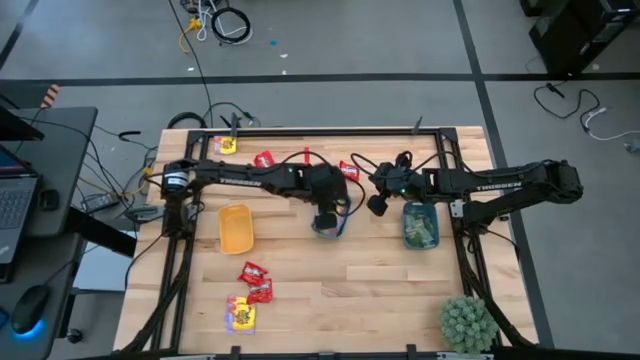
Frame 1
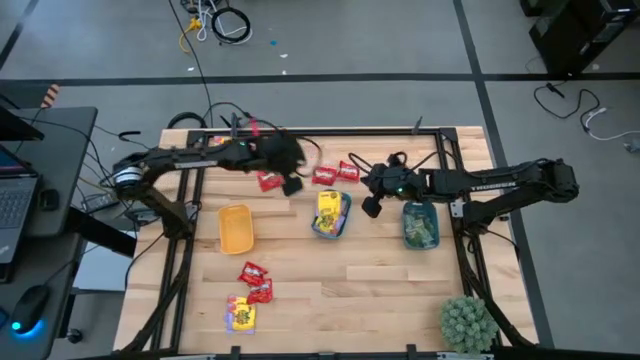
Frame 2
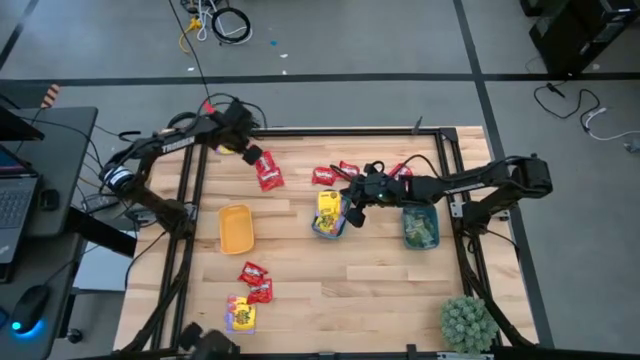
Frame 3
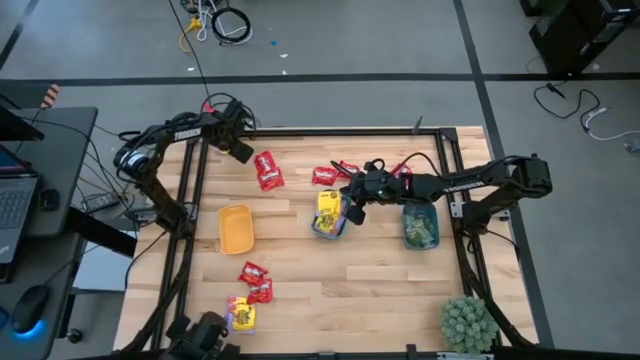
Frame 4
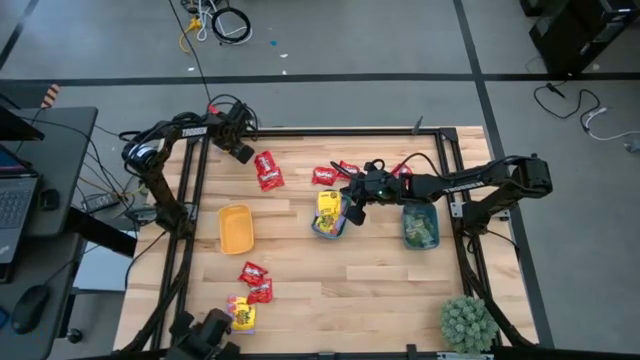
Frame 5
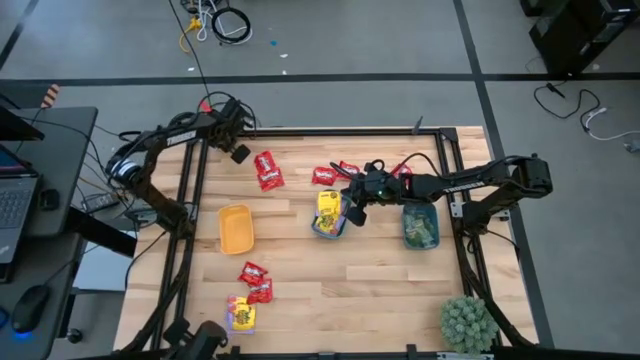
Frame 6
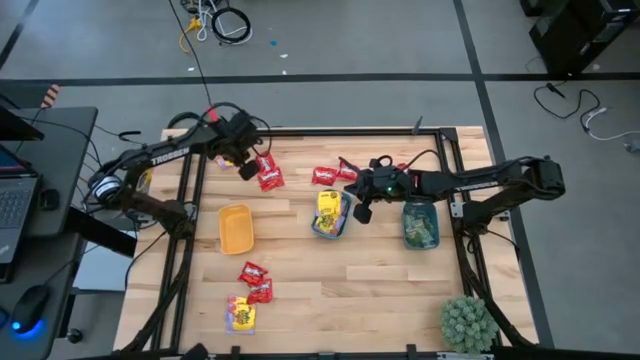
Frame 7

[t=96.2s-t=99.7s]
Task: Sort candy
Put the yellow candy pack into the green bin

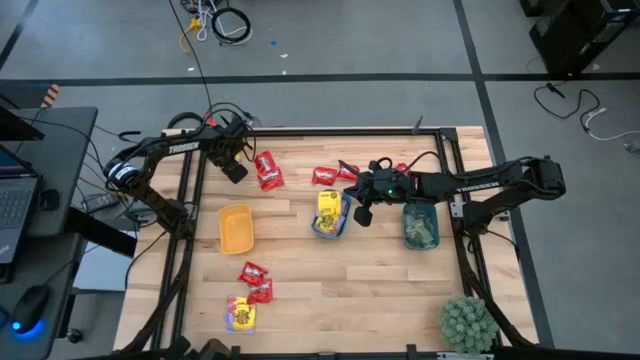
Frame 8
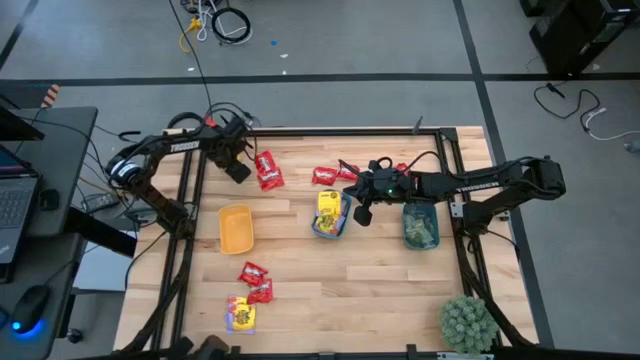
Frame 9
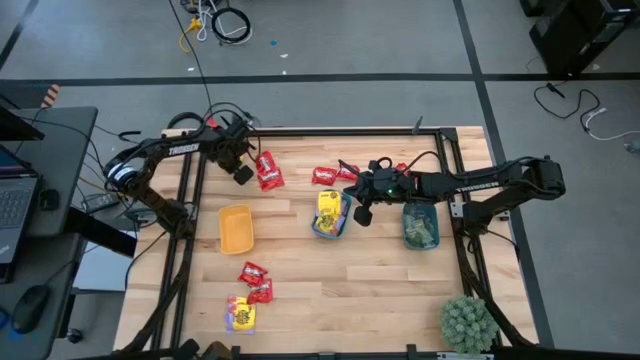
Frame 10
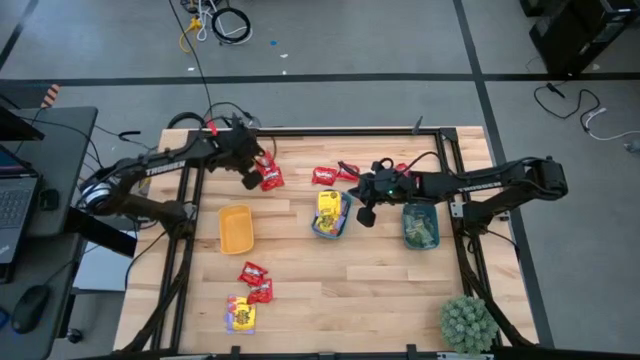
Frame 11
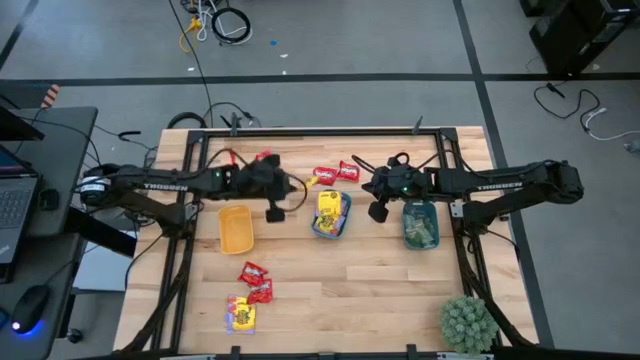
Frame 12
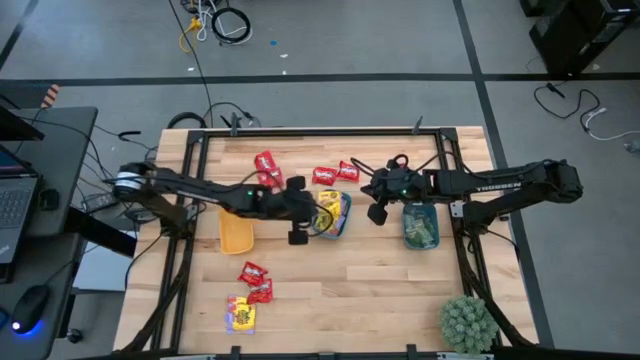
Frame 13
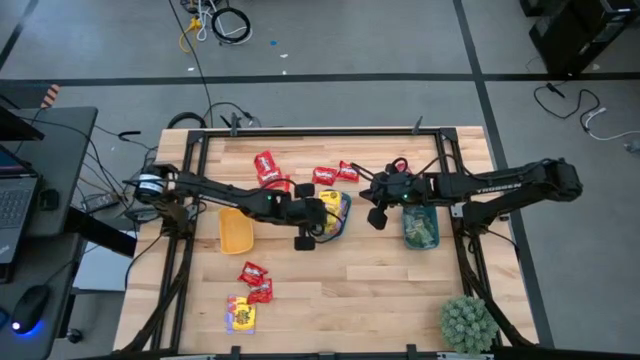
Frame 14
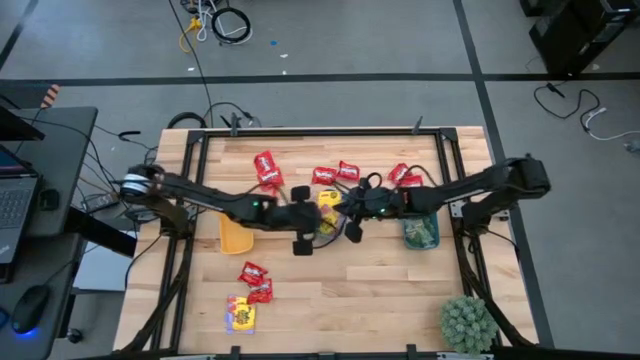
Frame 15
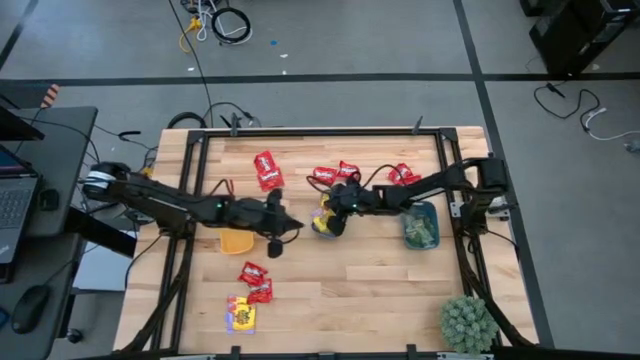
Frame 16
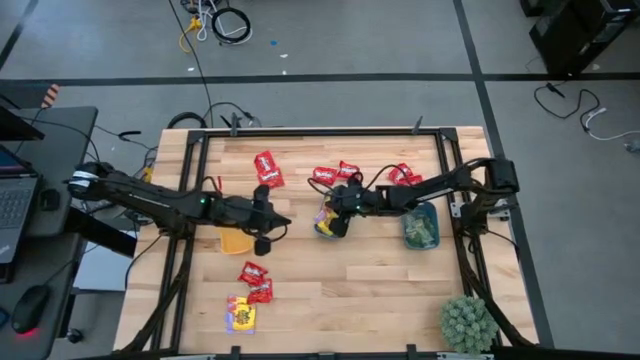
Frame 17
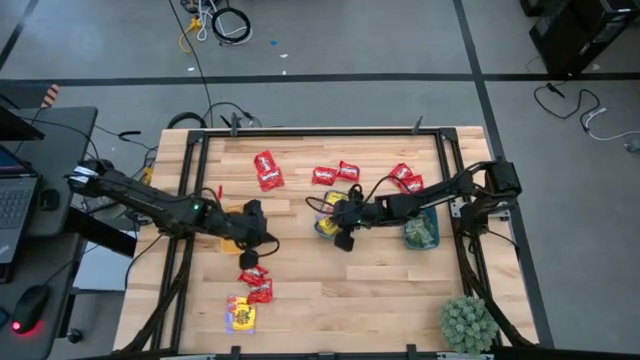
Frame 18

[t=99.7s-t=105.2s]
Put the yellow candy pack into the green bin

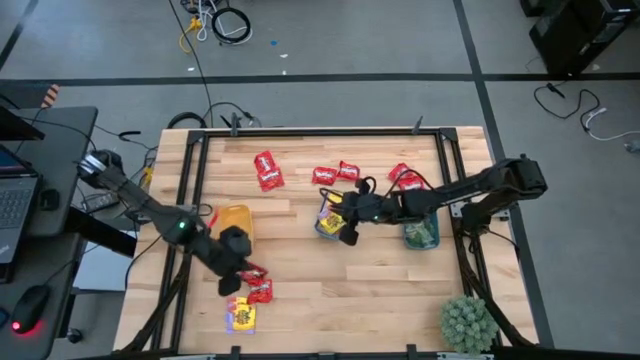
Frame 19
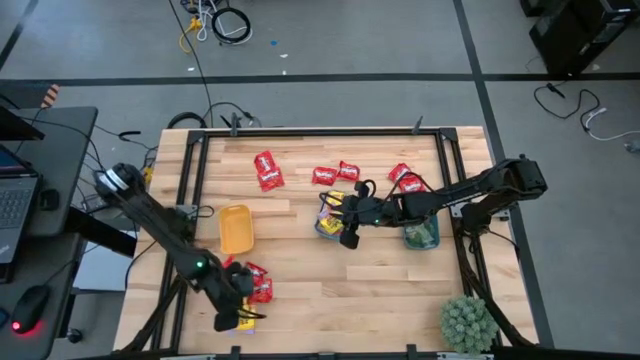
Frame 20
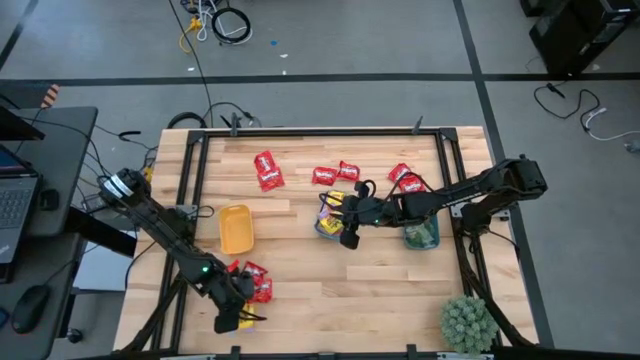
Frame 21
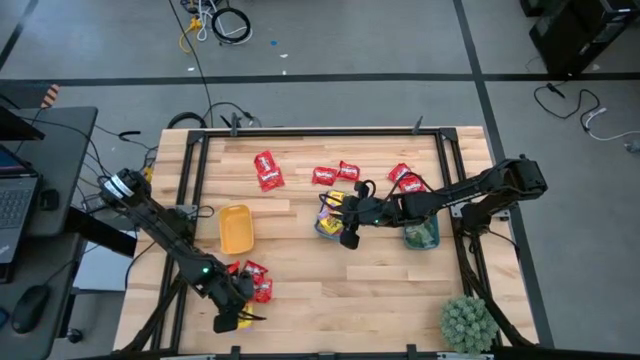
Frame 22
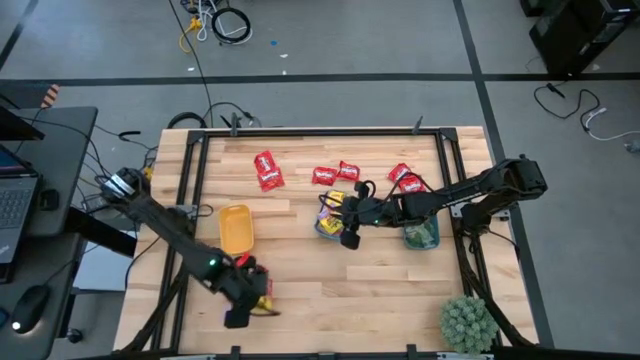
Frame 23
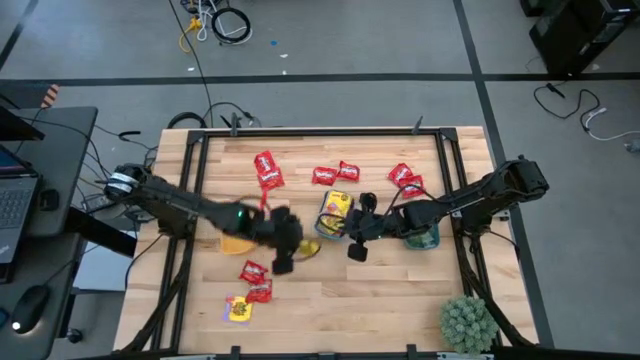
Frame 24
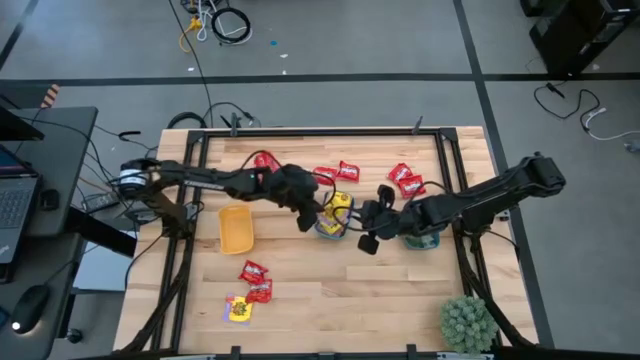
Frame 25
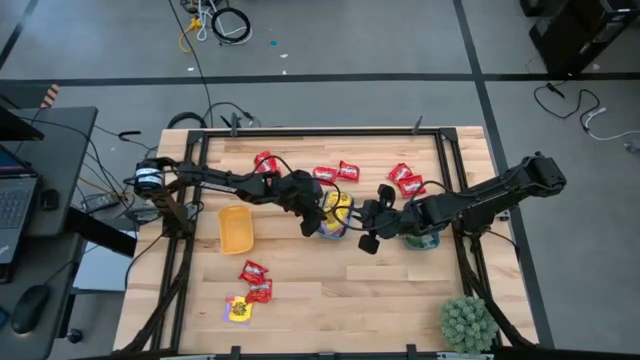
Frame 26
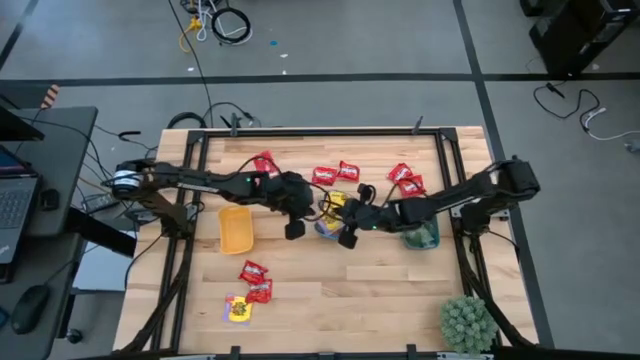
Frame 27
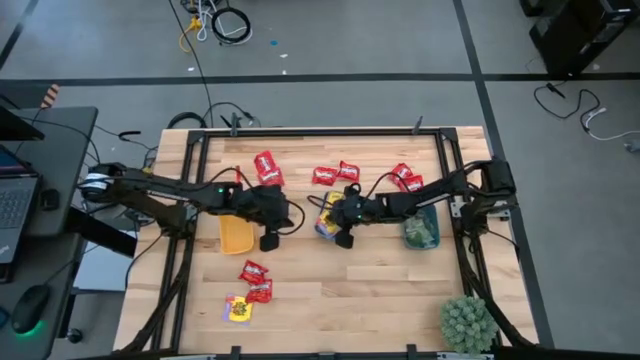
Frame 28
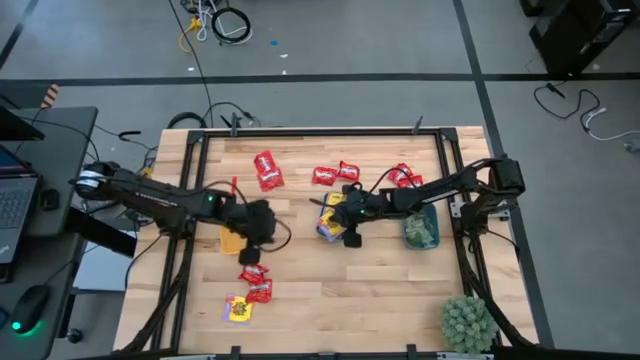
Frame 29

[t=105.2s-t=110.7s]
Put the yellow candy pack into the green bin

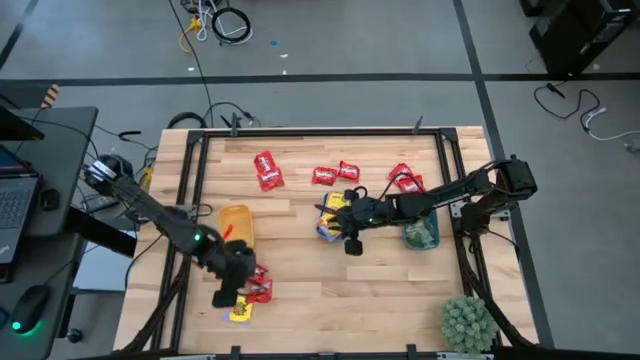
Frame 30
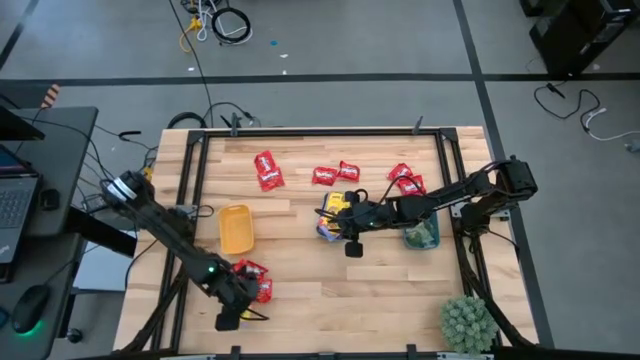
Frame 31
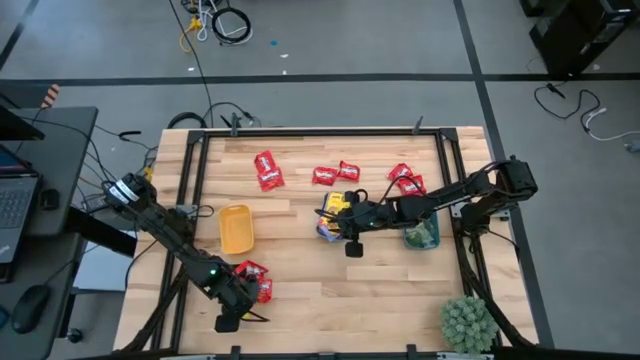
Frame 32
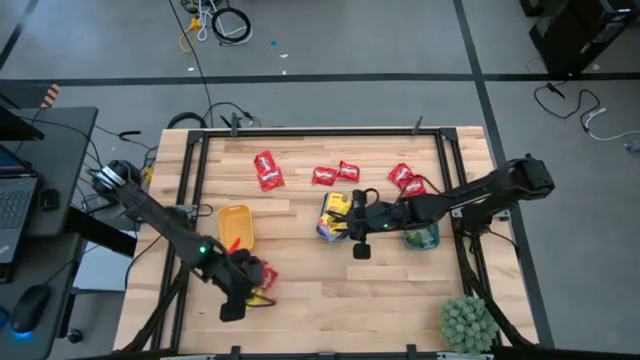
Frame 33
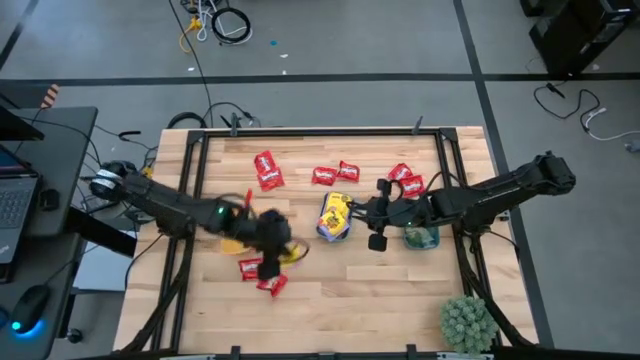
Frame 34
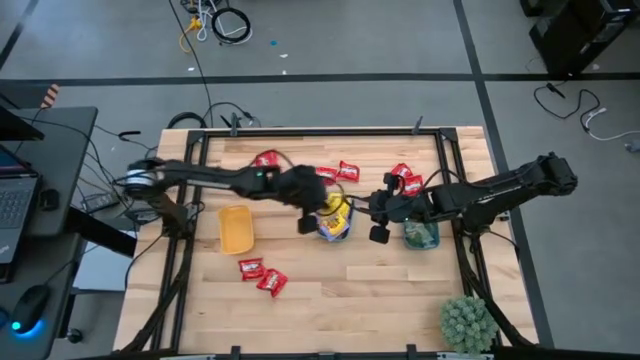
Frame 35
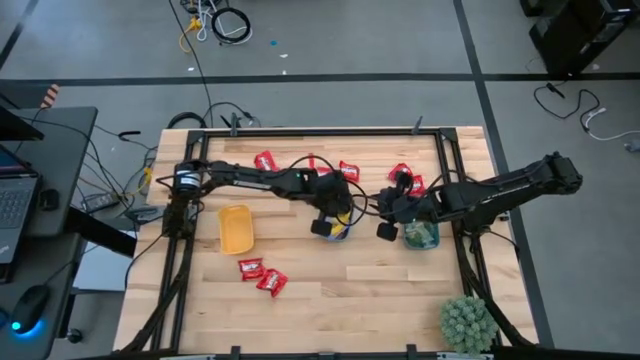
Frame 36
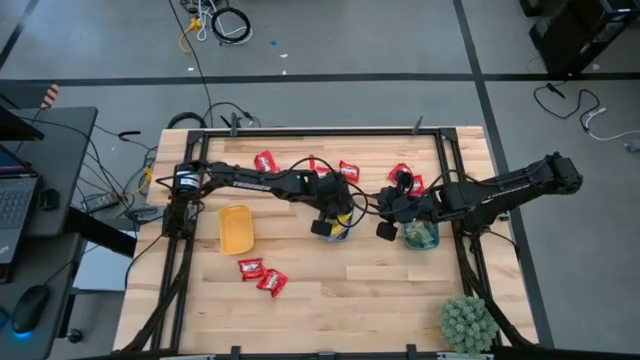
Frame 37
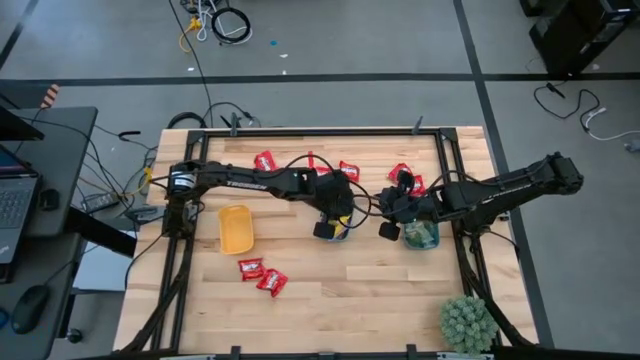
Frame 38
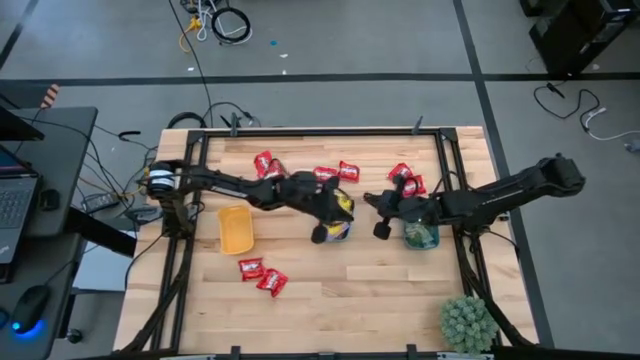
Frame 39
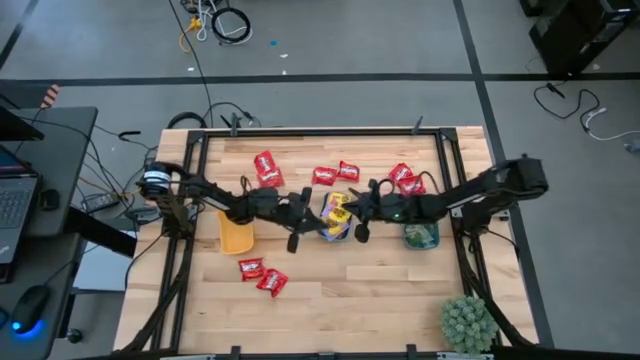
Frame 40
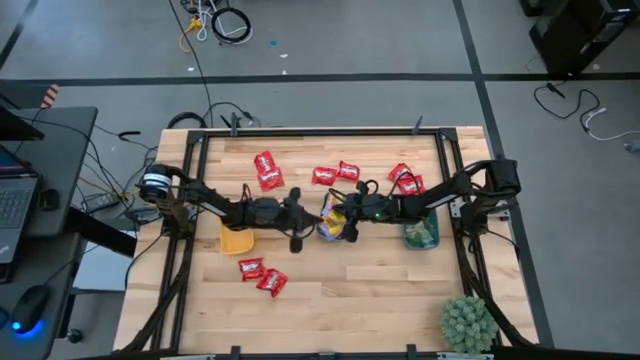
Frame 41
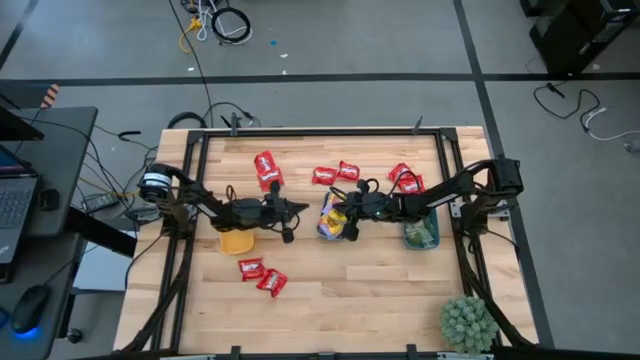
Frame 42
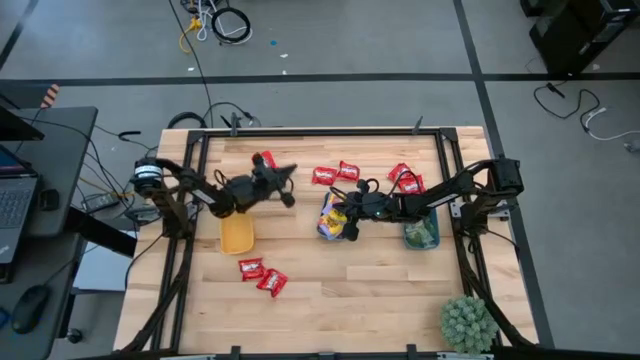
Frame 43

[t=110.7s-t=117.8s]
Put the yellow candy pack into the green bin
